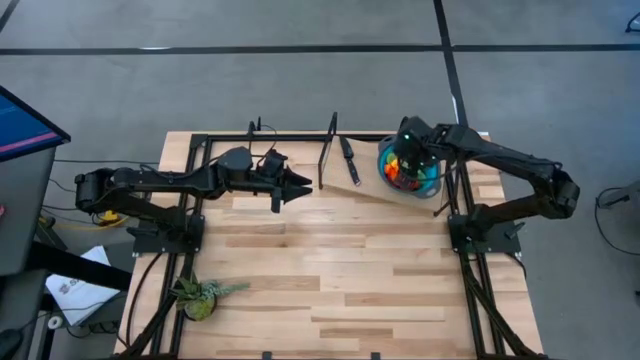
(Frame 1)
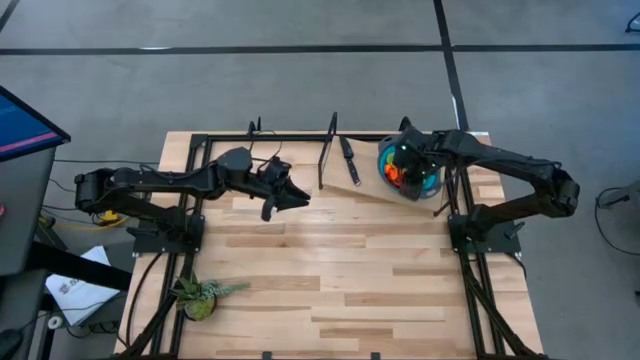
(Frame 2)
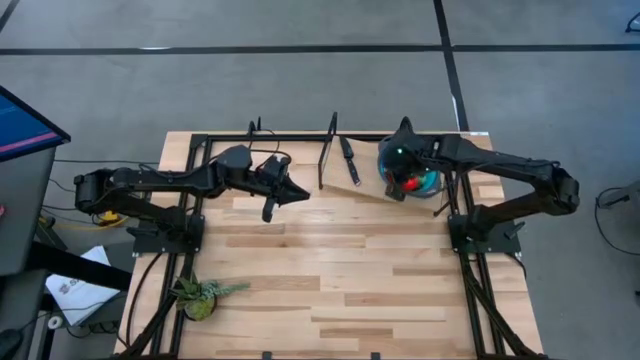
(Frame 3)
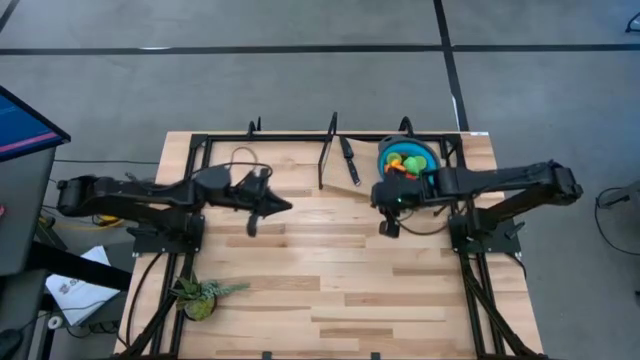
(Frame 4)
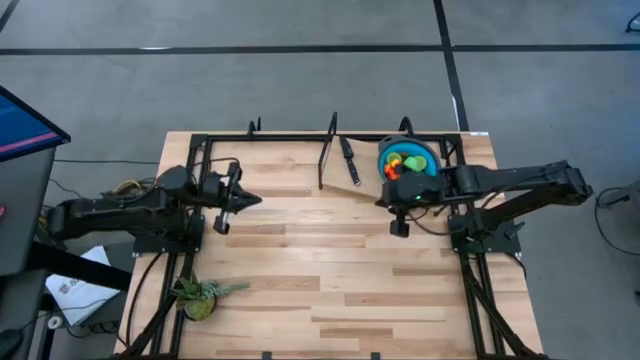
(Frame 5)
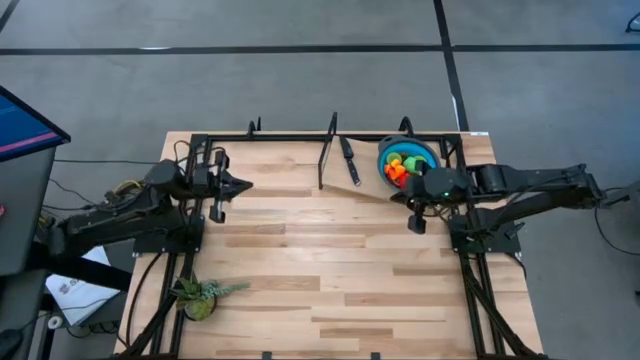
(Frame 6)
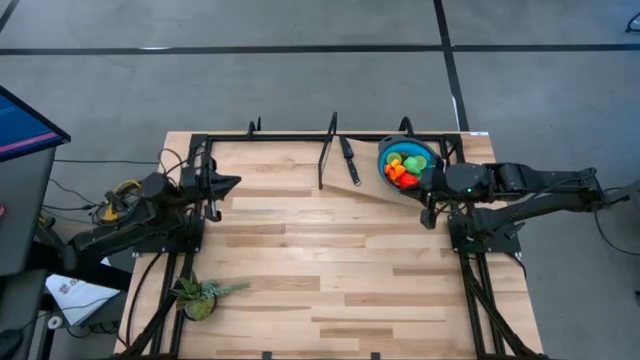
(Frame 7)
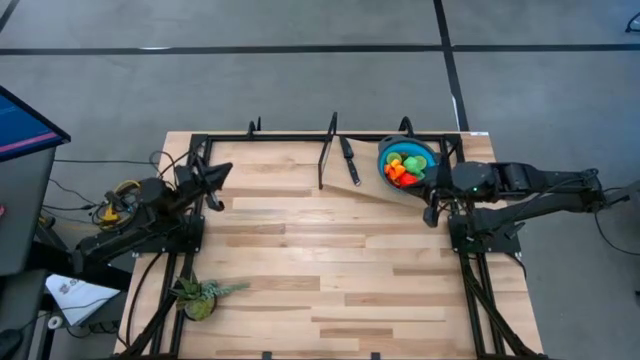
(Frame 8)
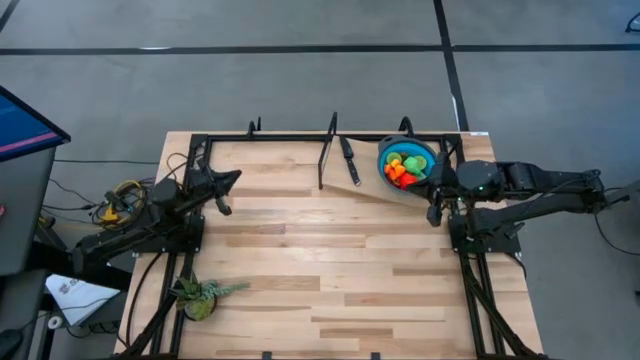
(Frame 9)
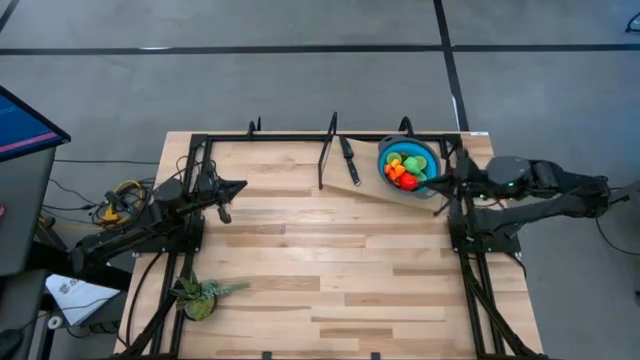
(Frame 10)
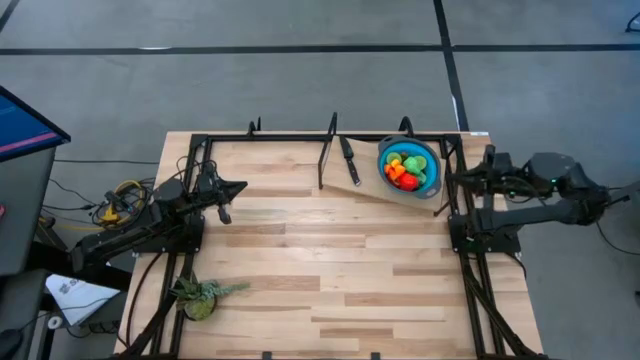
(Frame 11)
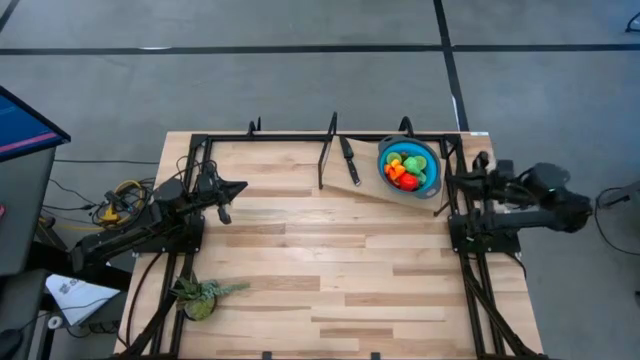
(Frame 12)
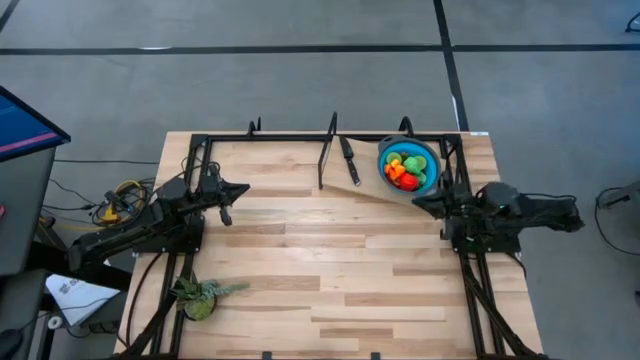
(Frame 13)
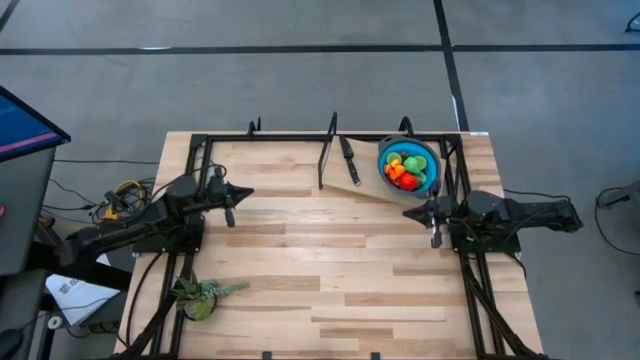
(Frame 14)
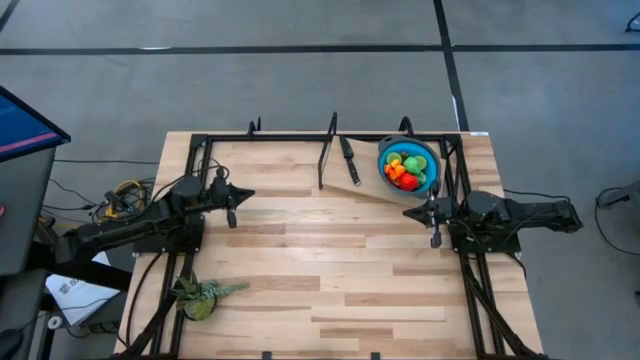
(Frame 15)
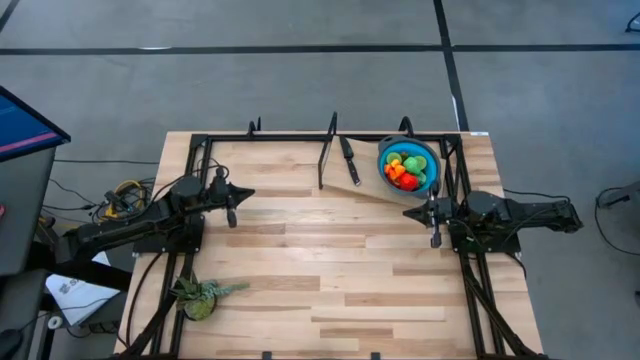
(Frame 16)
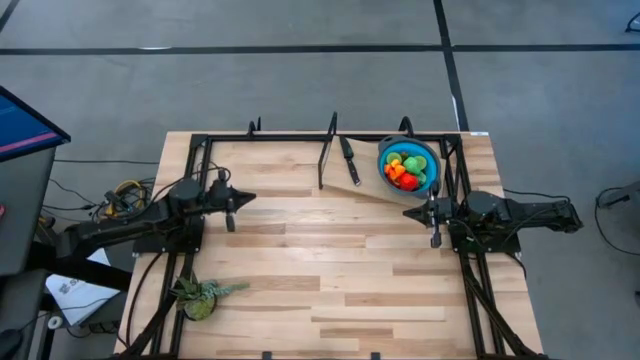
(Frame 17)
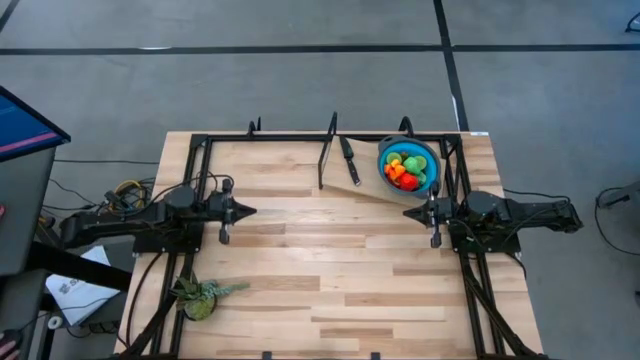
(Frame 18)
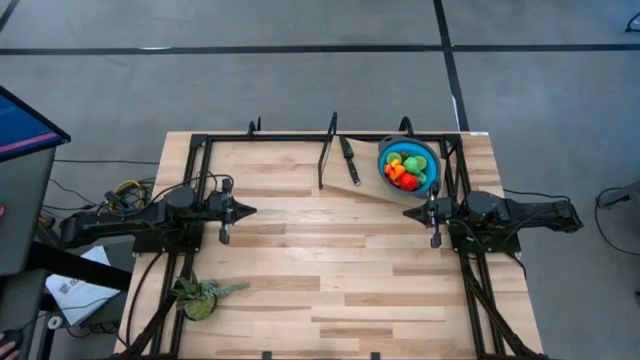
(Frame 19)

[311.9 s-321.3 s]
Task: Pick & Place Fruit
Return to Home Position

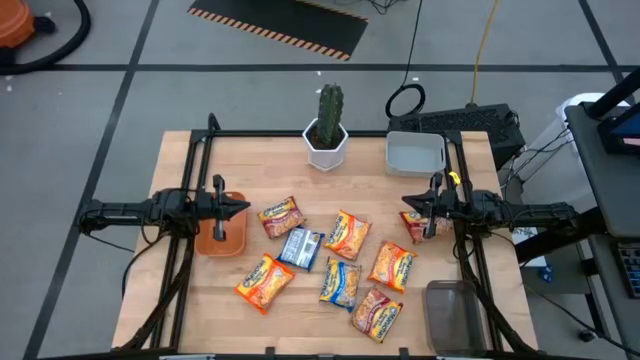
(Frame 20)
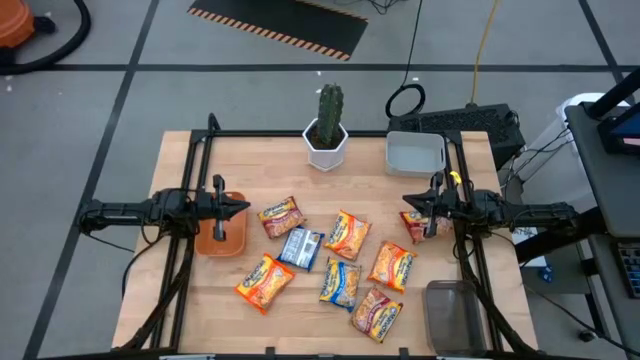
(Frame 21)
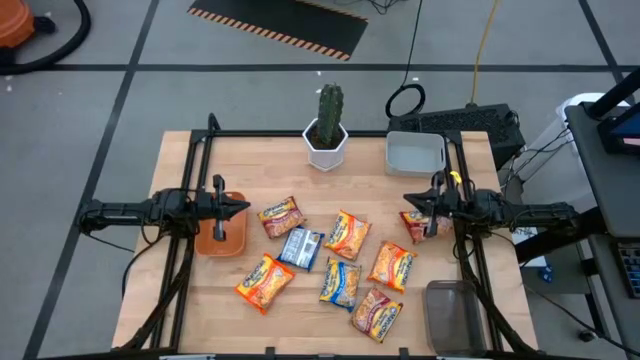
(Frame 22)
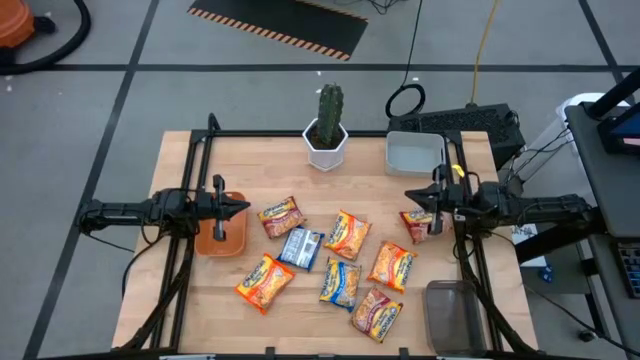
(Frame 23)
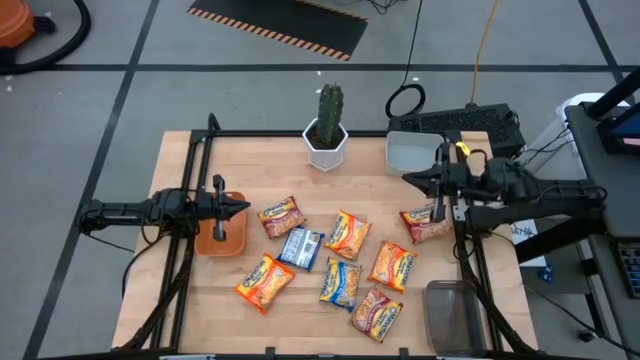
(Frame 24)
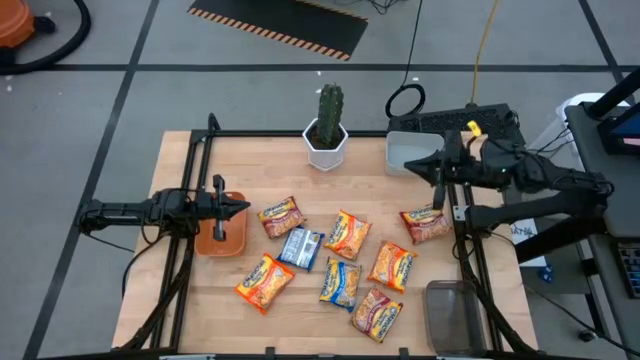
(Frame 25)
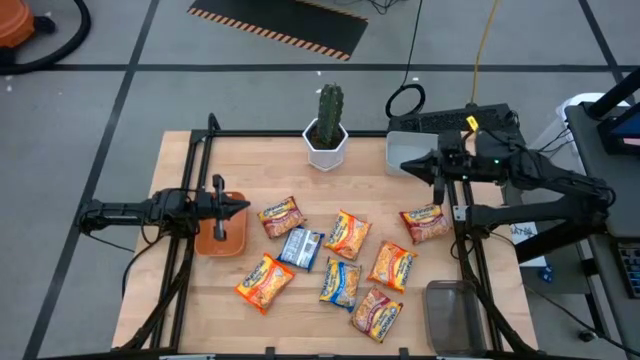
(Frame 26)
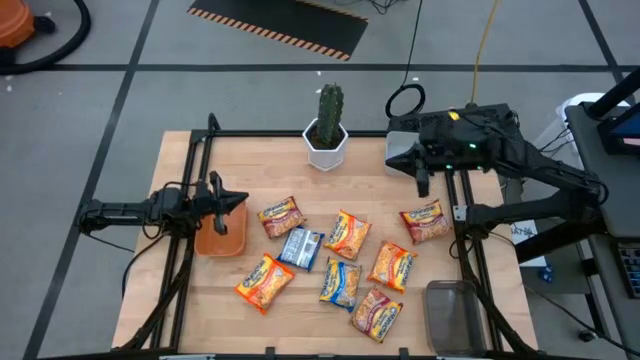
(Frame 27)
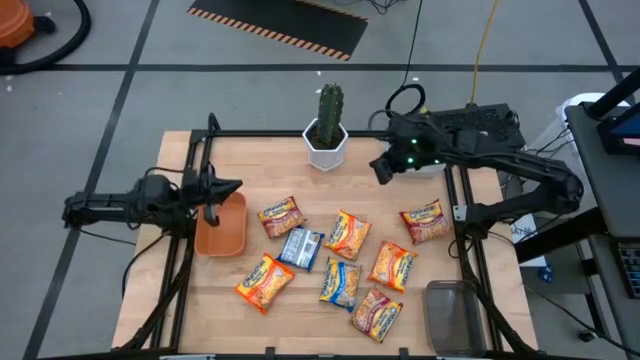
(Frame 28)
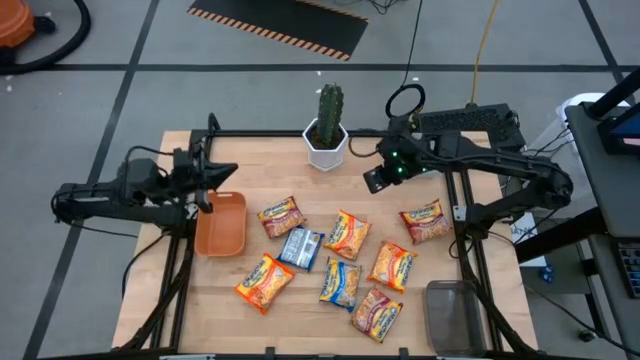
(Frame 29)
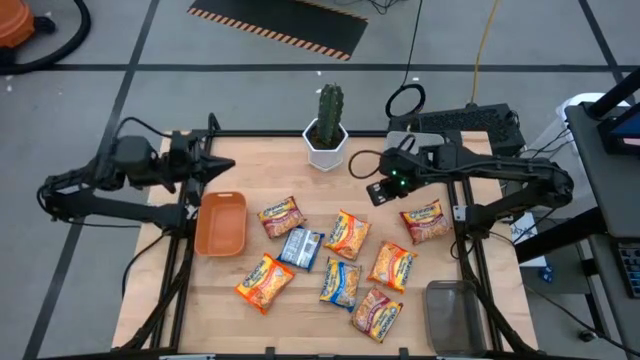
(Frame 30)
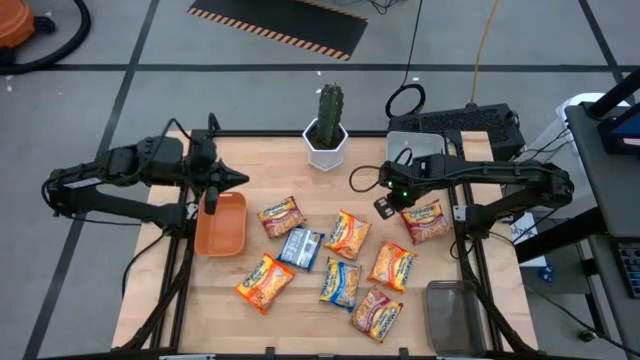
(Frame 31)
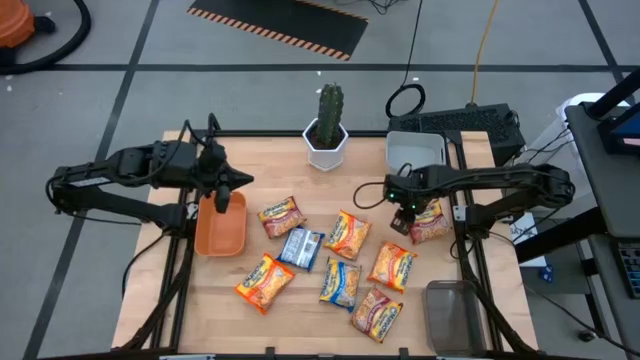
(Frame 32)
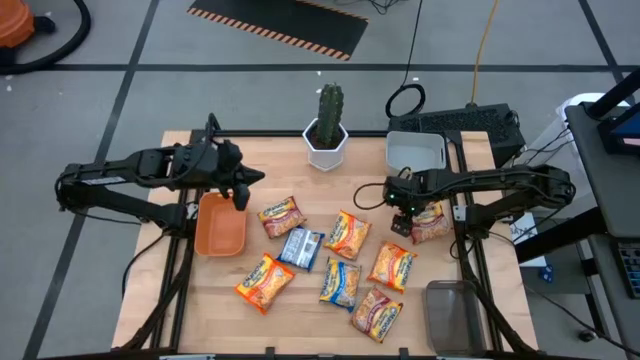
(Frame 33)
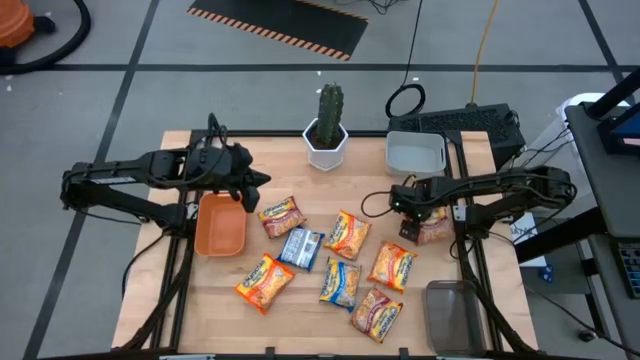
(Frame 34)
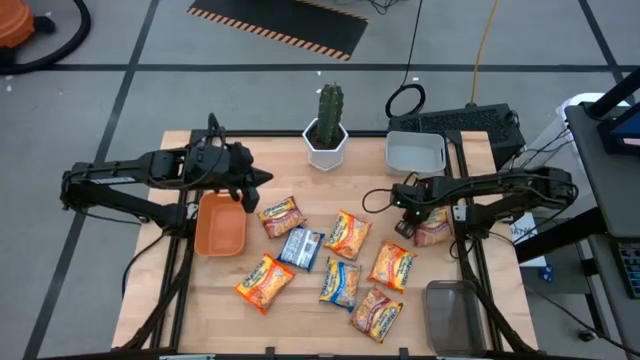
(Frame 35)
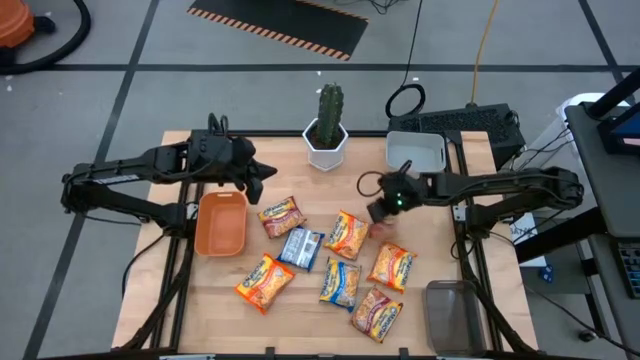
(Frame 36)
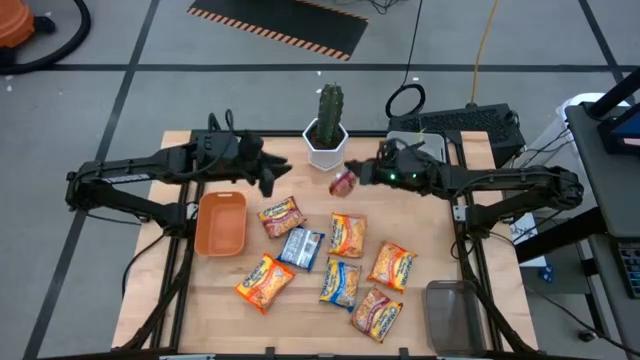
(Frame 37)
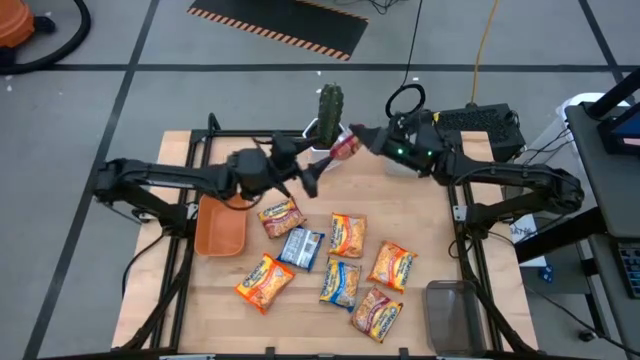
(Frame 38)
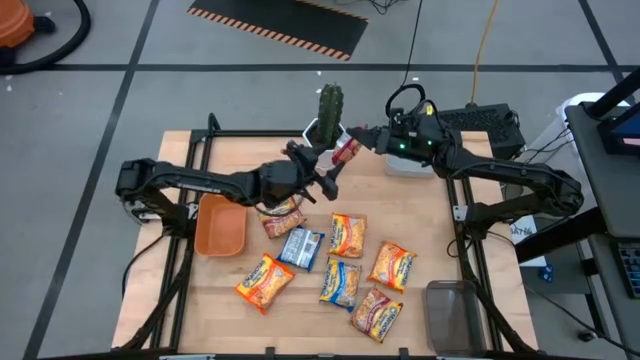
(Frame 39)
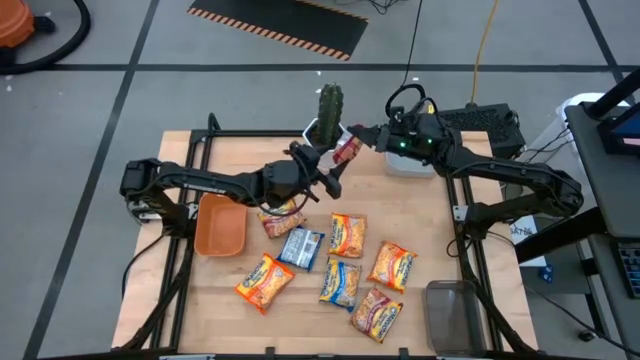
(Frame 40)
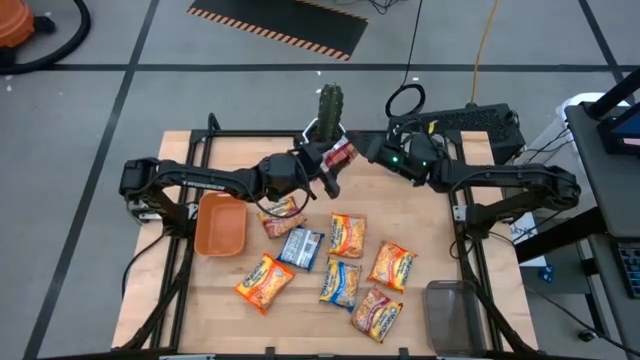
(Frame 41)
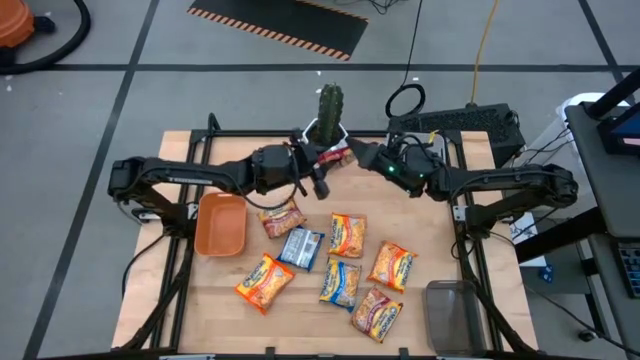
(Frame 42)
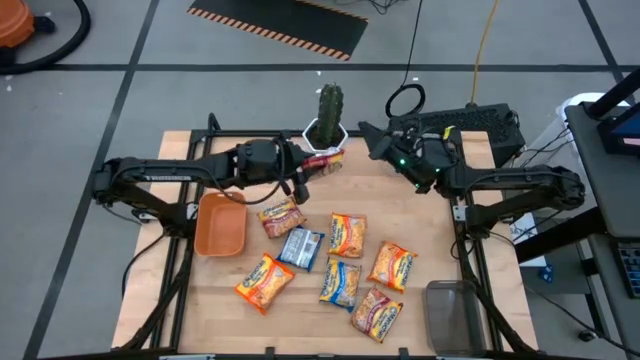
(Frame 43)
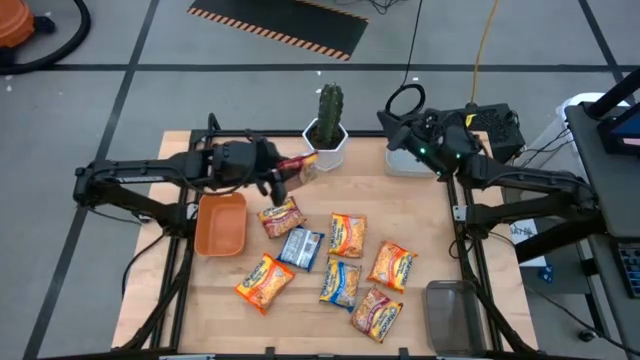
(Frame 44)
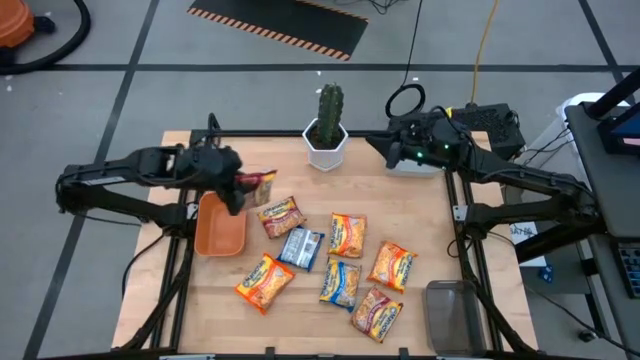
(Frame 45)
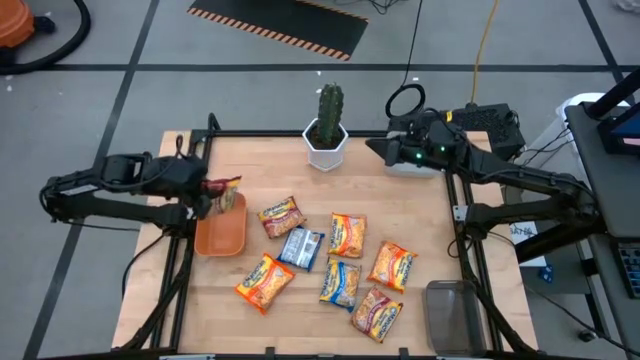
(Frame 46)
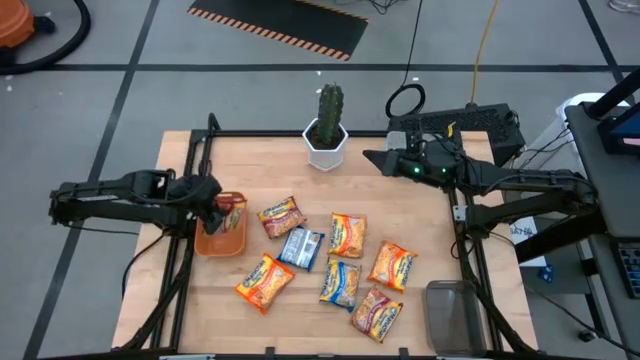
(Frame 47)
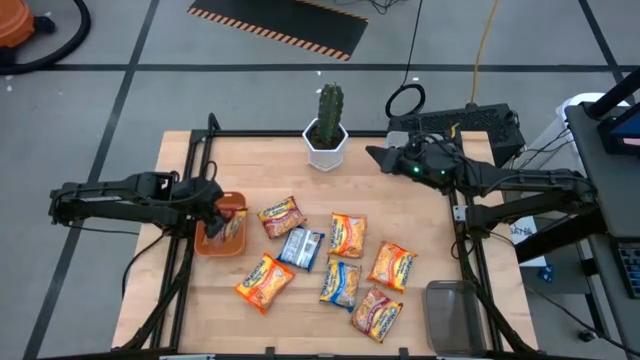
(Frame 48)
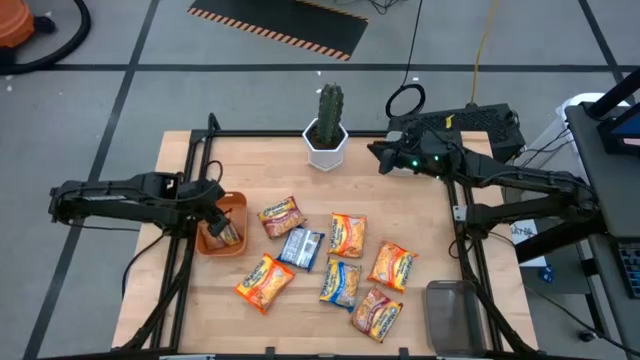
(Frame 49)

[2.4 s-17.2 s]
Task: Sort Maruchan noodles
Put the top right red noodle pack into the orange bin
